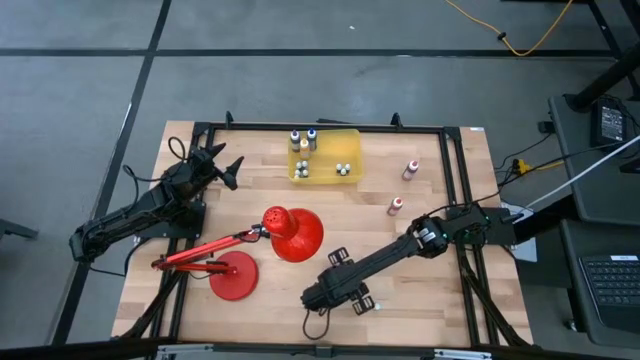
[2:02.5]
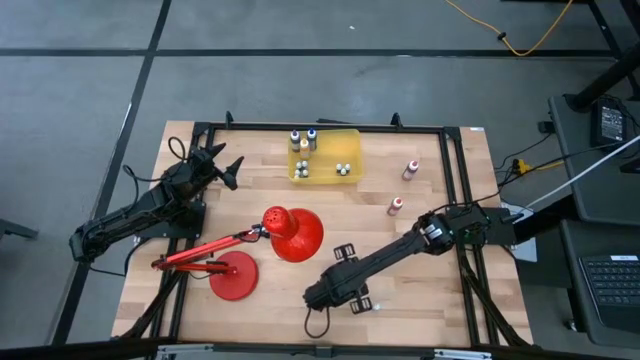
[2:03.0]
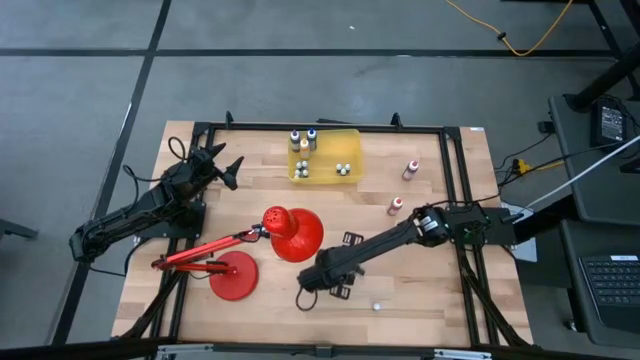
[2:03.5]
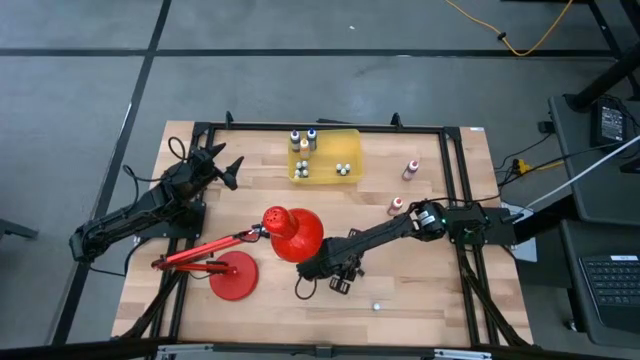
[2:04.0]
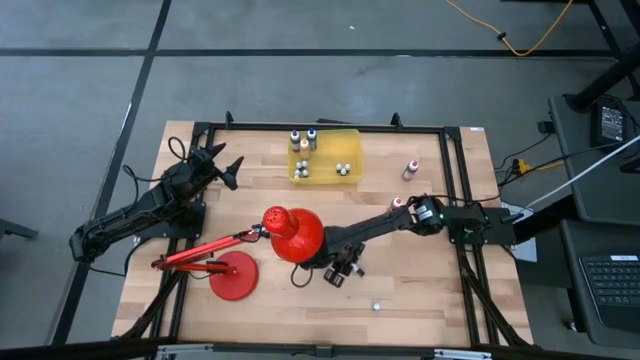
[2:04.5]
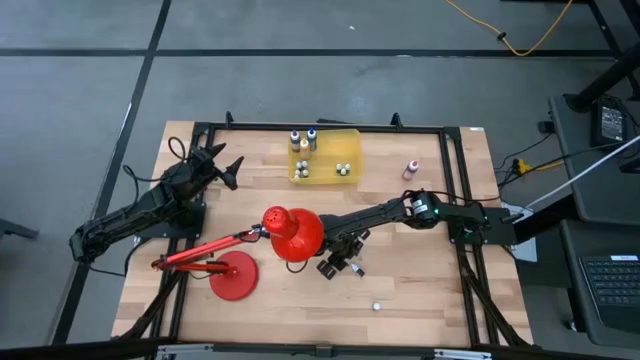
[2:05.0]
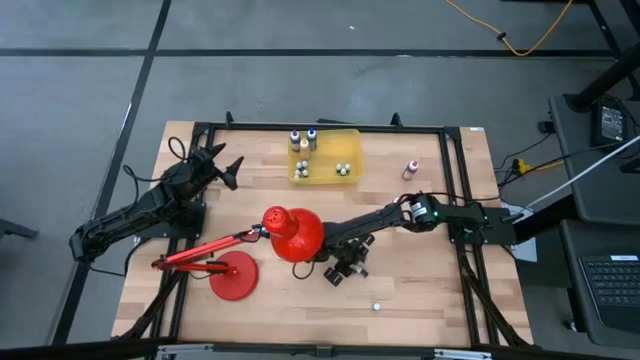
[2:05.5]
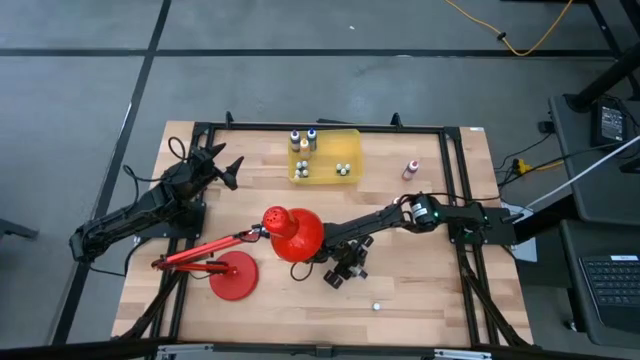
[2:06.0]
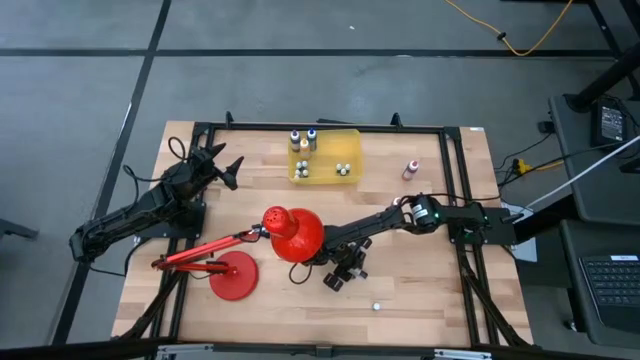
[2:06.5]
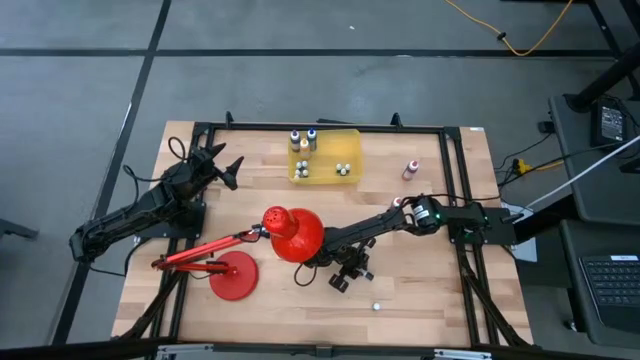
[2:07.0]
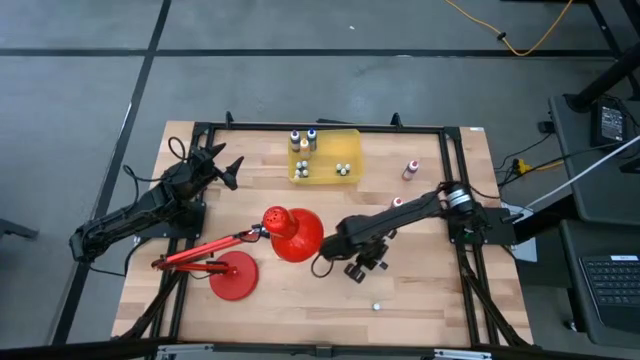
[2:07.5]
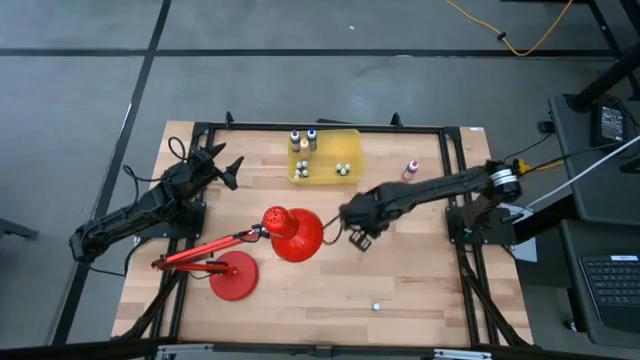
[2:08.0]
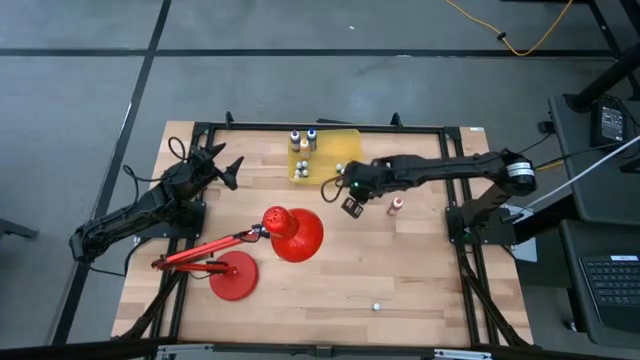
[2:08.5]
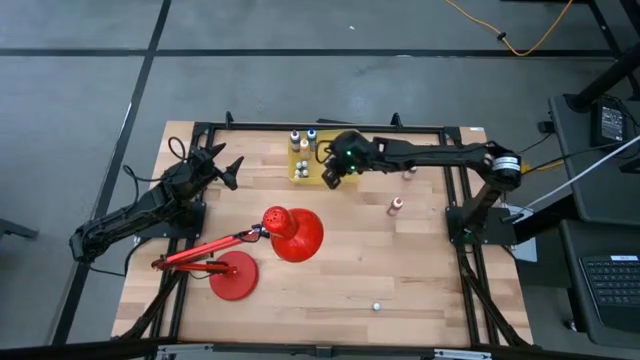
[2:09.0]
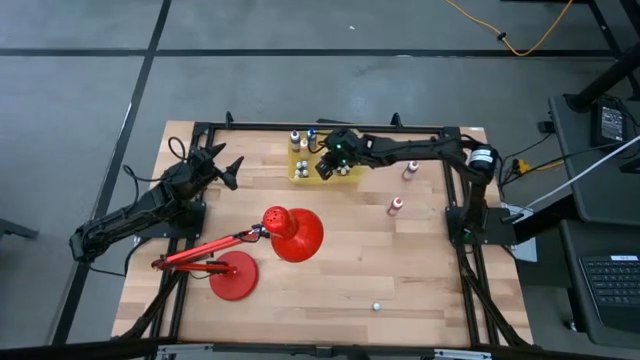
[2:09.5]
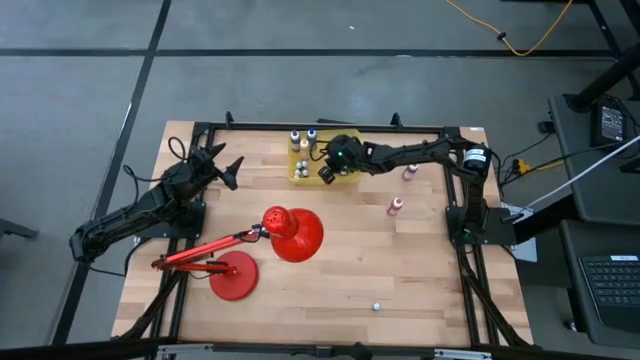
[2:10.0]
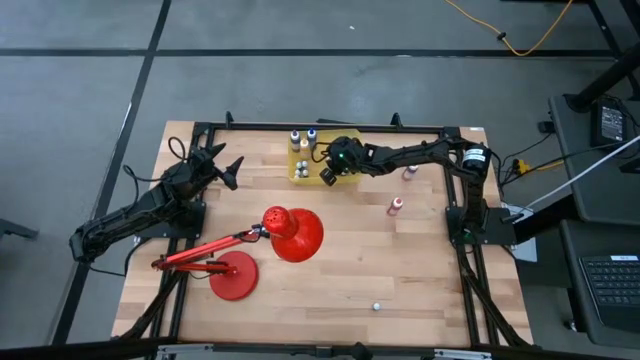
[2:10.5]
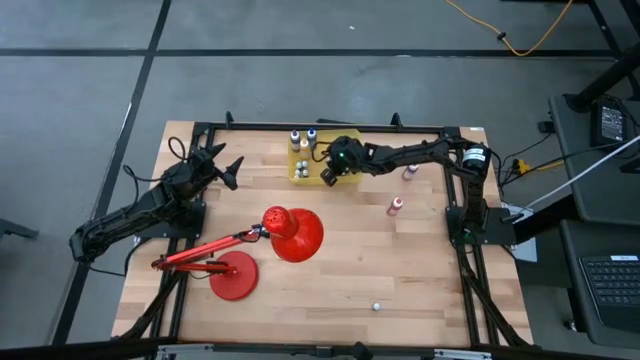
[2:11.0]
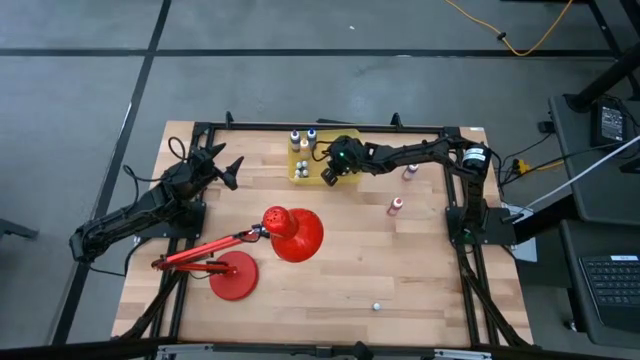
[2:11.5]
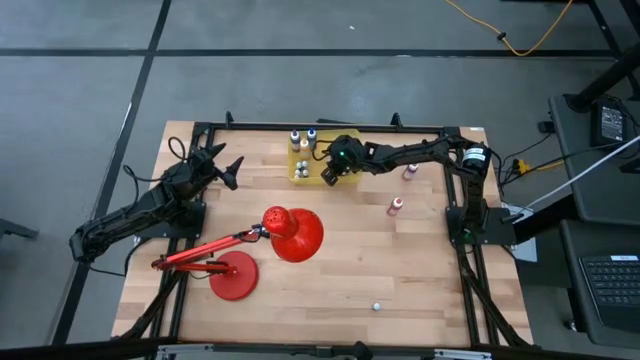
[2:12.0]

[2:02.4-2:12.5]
Task: Pick & Place food coloring
Put the red food coloring bottle into the yellow bin

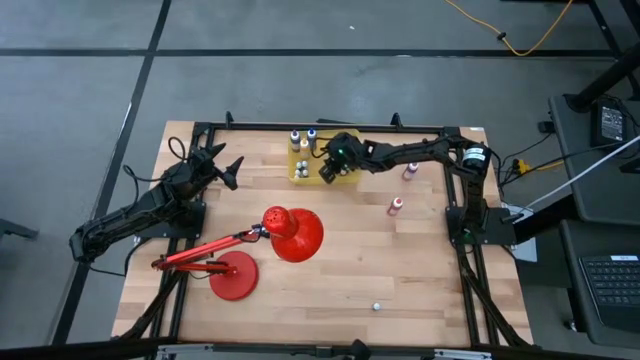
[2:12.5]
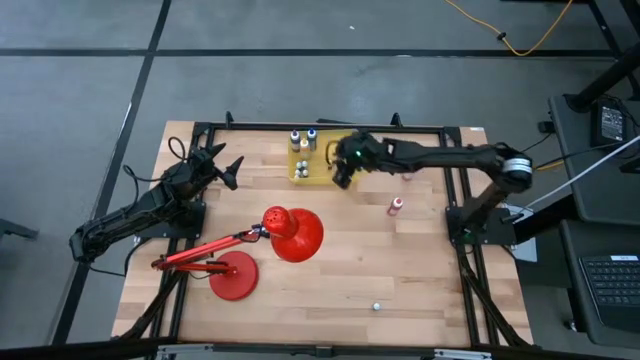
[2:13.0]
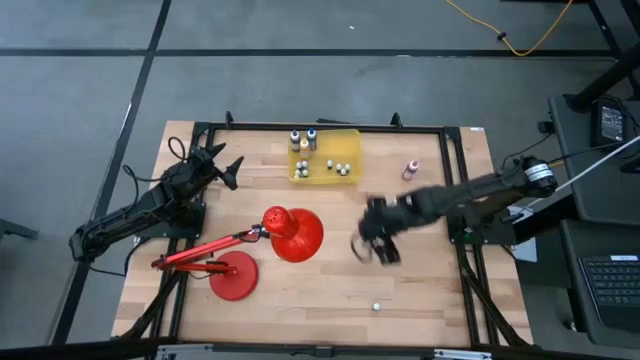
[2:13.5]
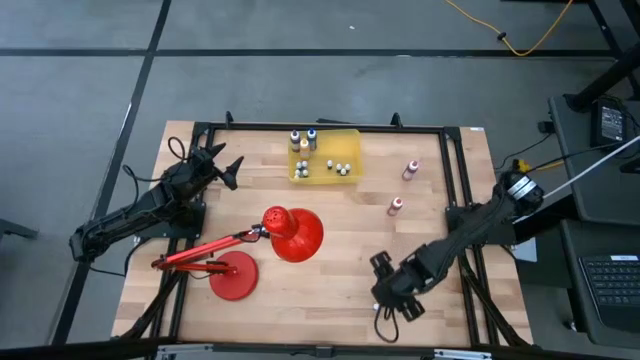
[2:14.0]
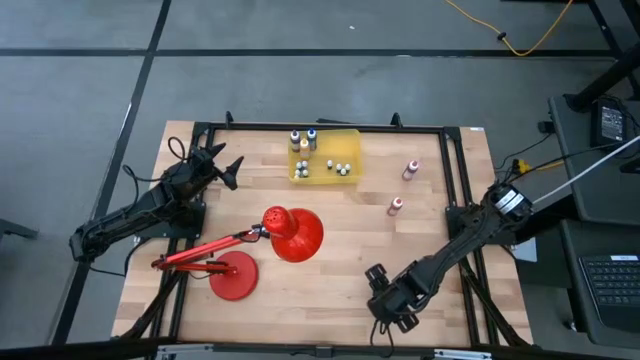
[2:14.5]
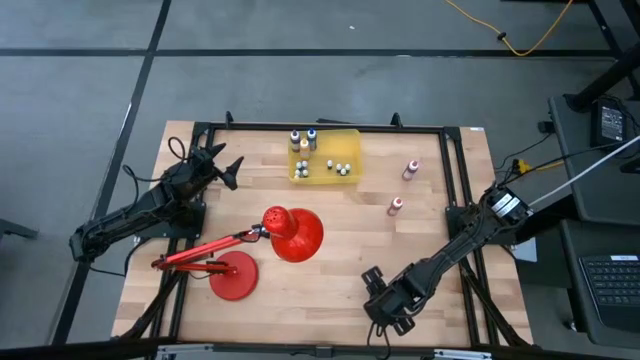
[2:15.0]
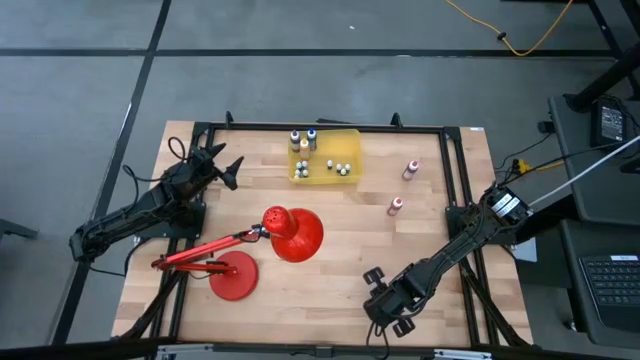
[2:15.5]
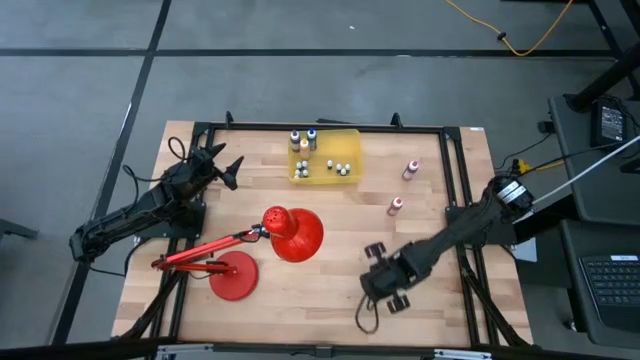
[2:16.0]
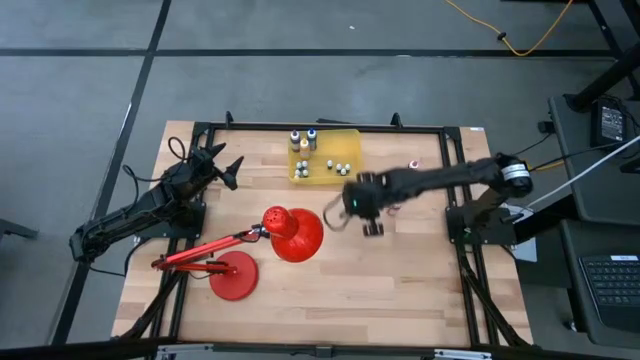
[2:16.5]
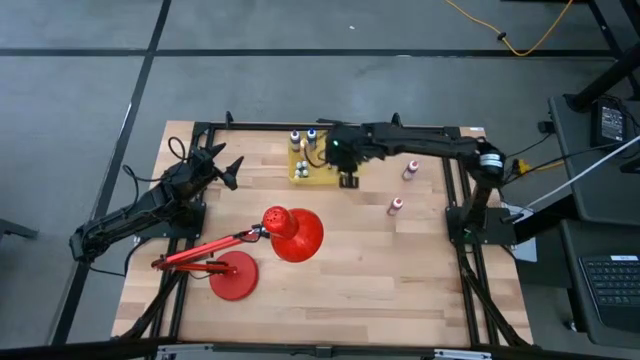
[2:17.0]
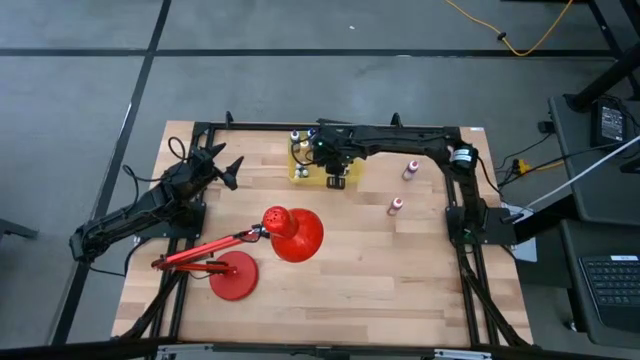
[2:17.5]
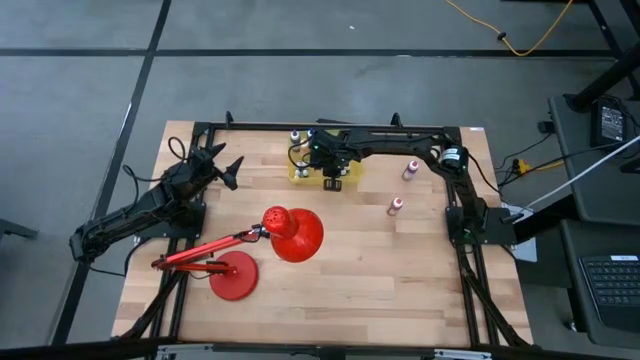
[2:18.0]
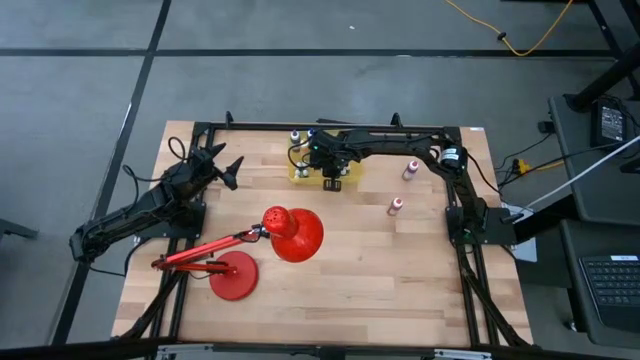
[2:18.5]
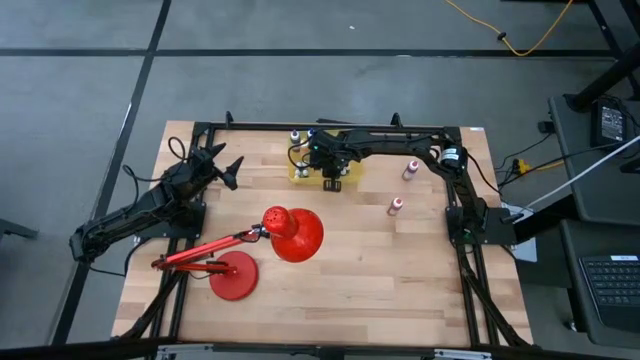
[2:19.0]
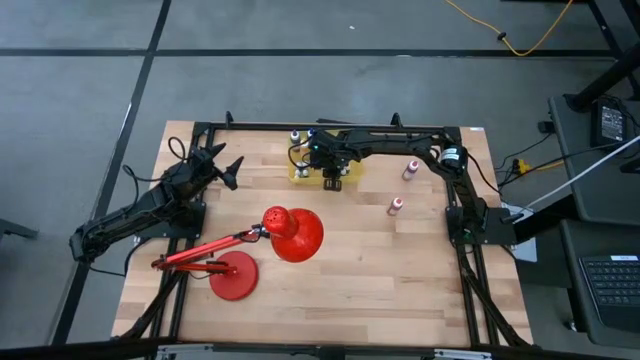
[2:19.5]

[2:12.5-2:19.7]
Put the purple food coloring bottle into the yellow bin

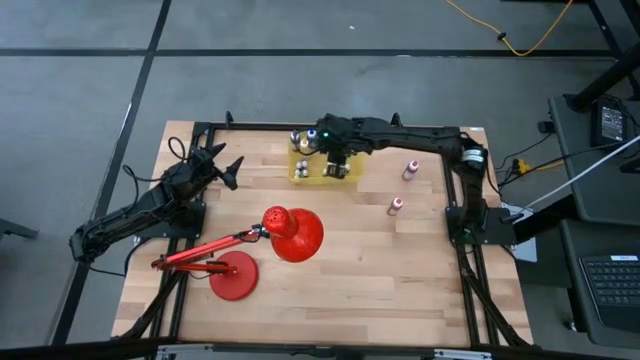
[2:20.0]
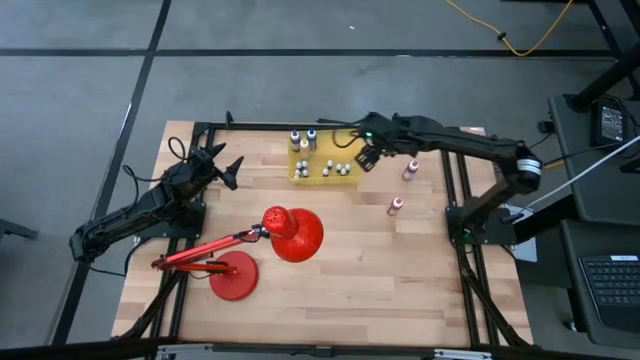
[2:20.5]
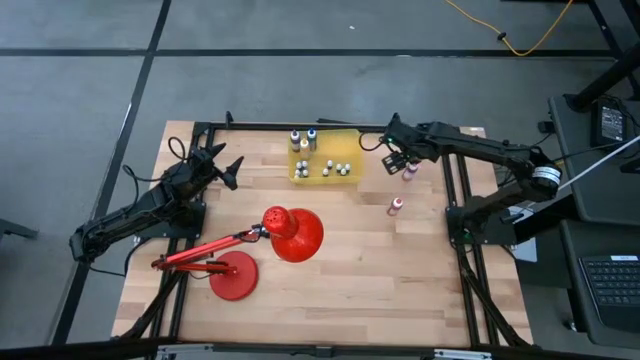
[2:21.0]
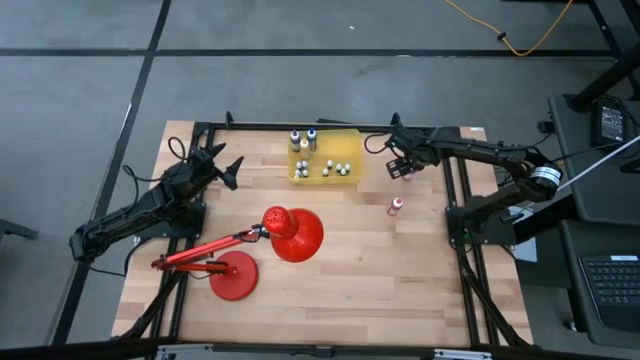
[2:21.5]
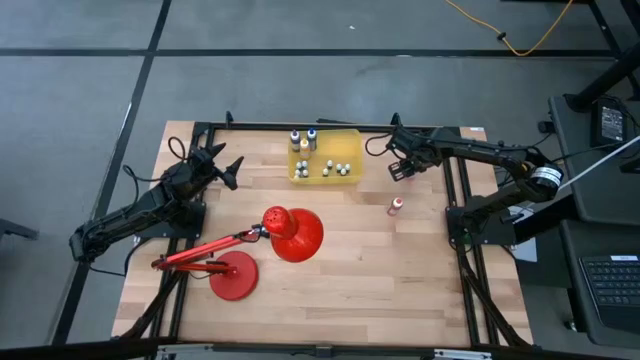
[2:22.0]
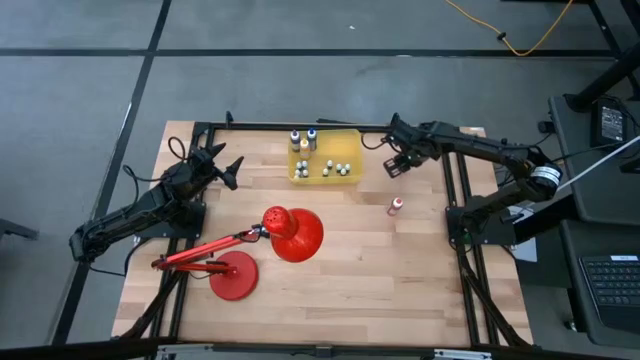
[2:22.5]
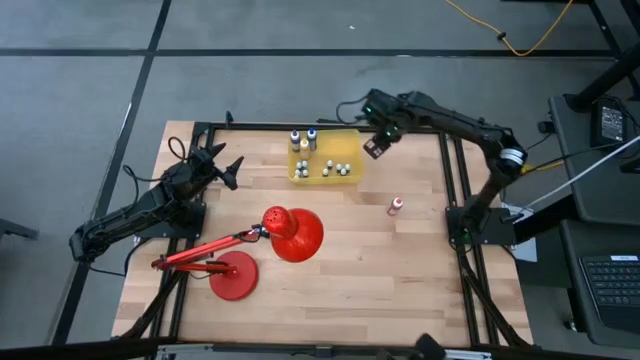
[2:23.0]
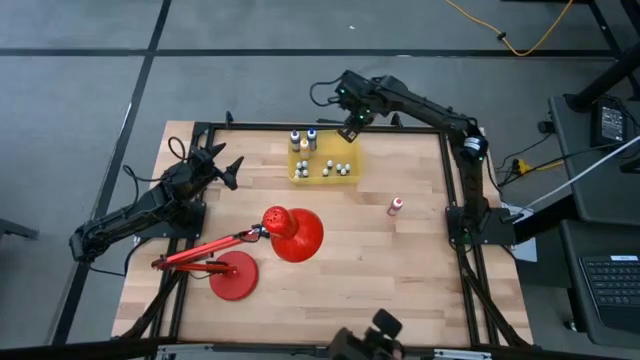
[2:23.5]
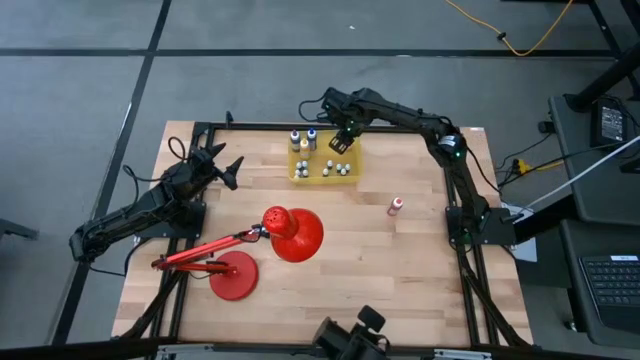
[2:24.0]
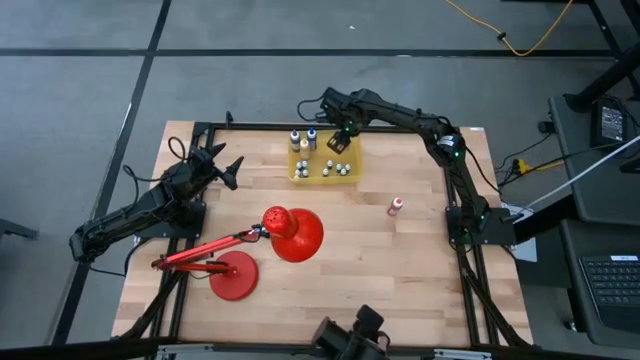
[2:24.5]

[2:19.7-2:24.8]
Put the pink food coloring bottle into the yellow bin
